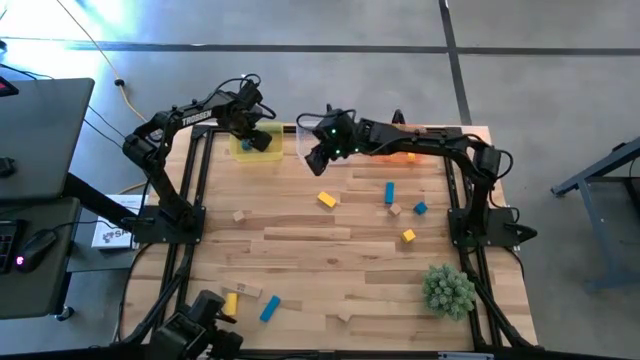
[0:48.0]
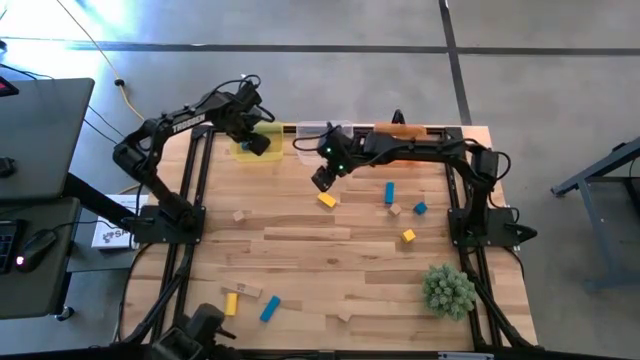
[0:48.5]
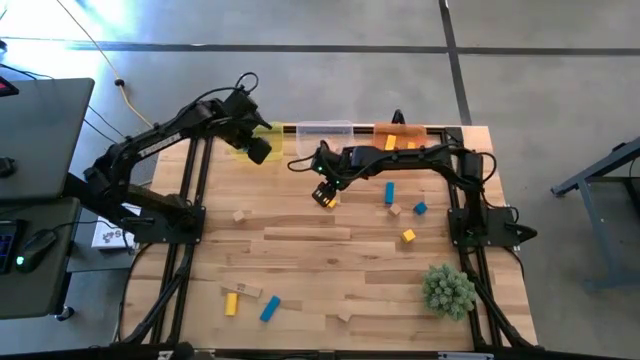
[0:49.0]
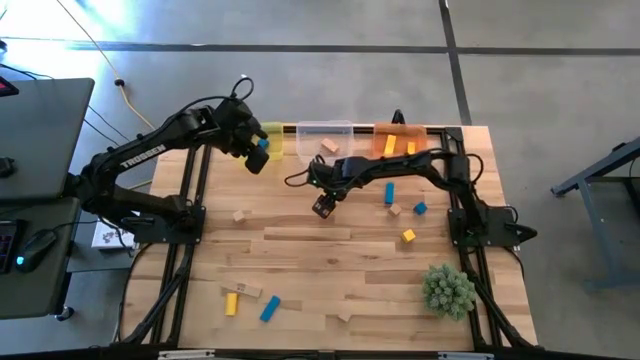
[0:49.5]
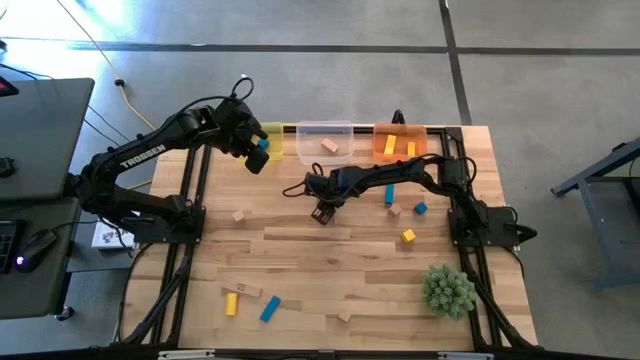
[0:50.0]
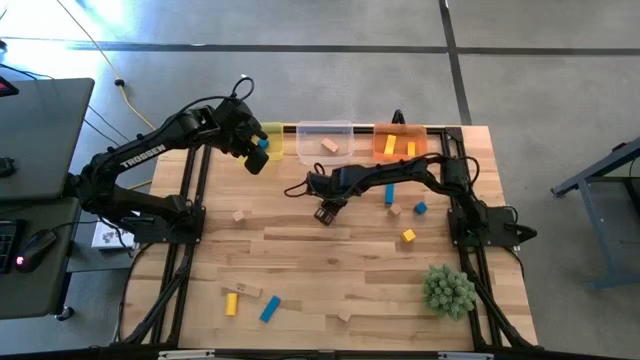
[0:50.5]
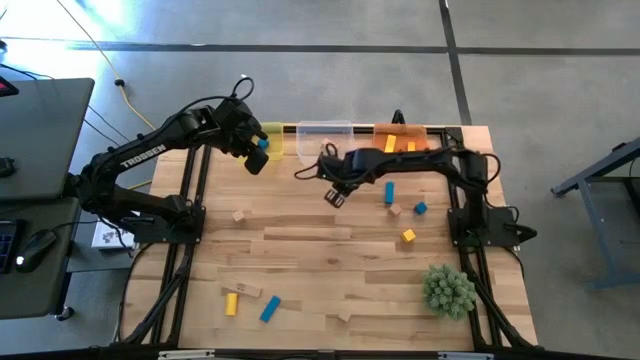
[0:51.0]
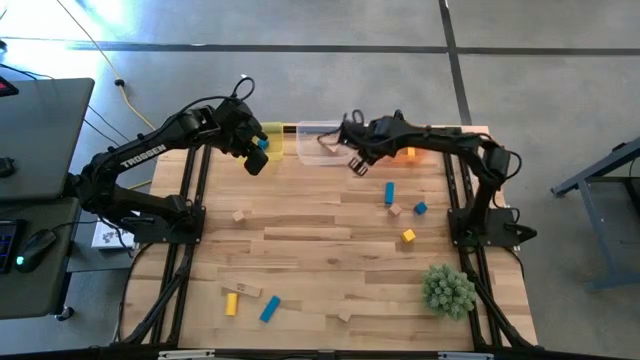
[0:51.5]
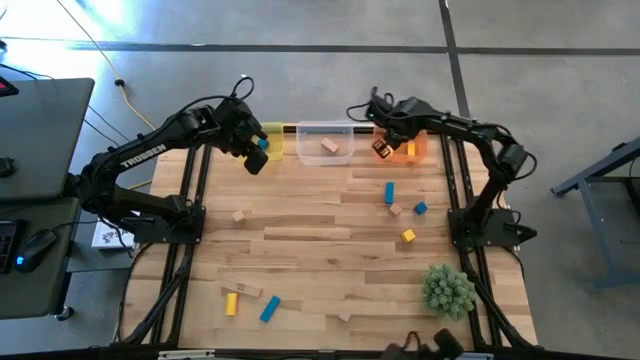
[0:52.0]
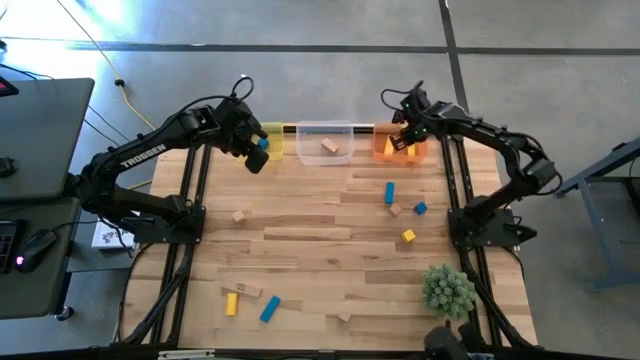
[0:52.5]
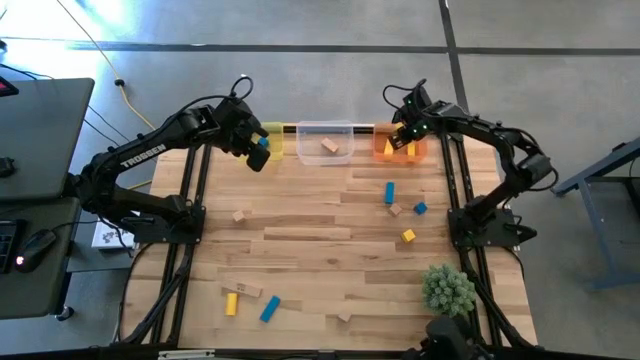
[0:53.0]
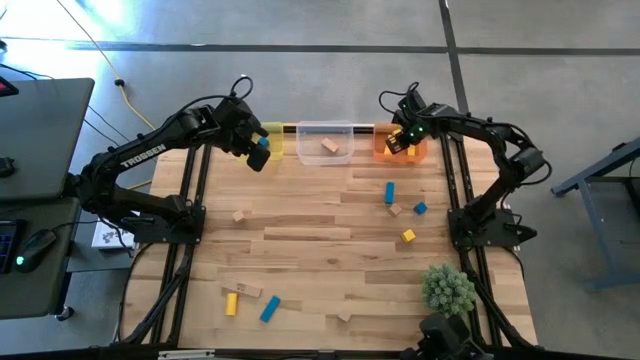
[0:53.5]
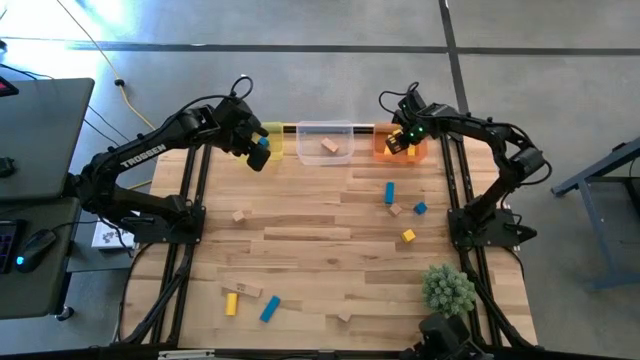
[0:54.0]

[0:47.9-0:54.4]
Task: Sort & place blocks by color
Put the yellow block into the orange bin

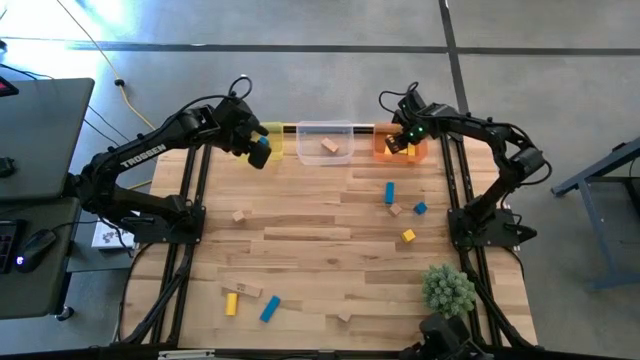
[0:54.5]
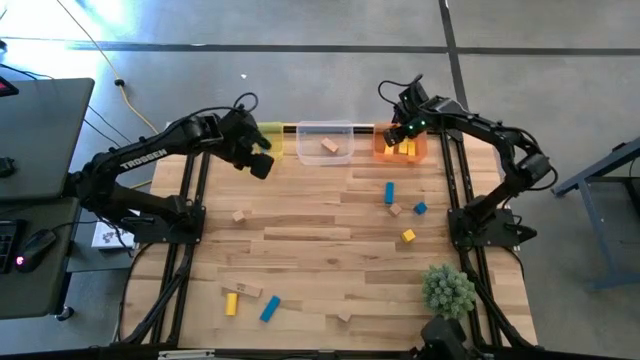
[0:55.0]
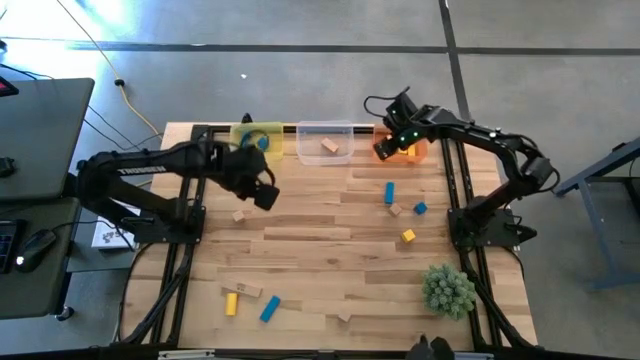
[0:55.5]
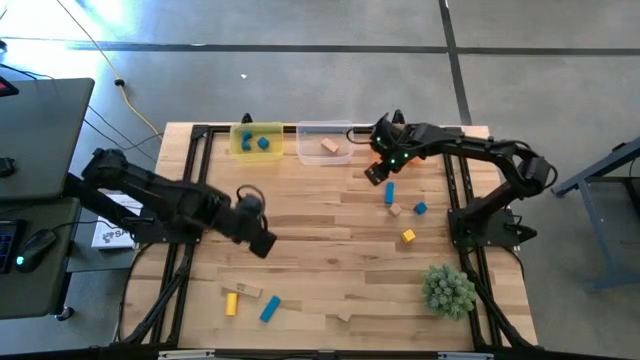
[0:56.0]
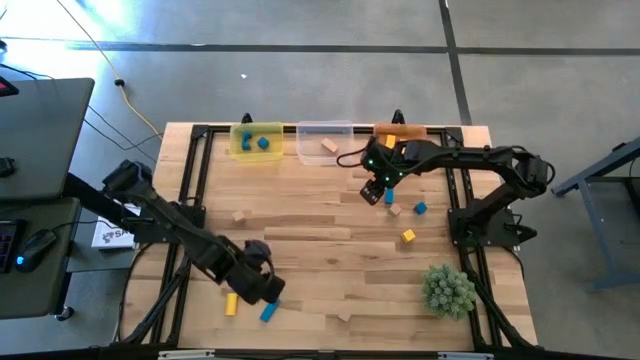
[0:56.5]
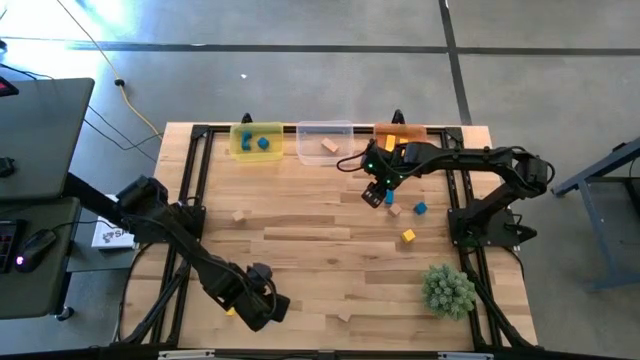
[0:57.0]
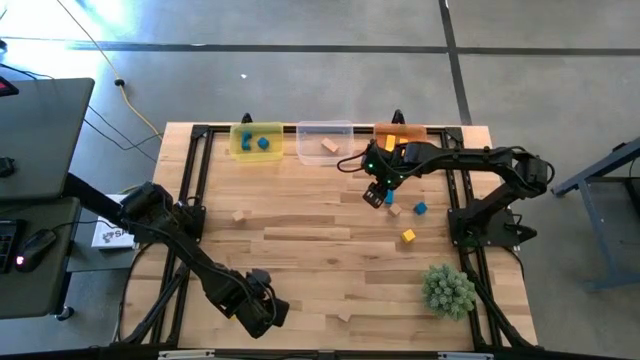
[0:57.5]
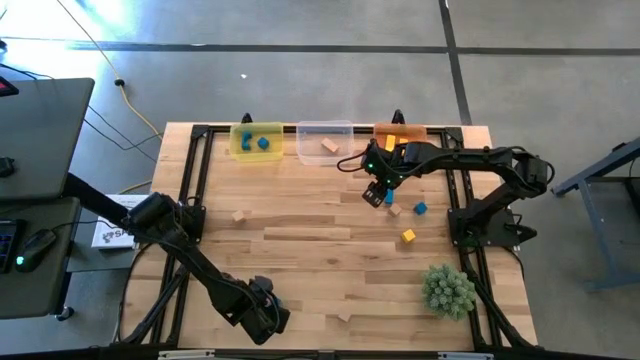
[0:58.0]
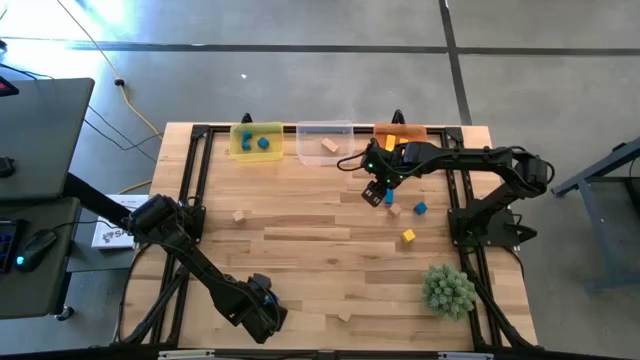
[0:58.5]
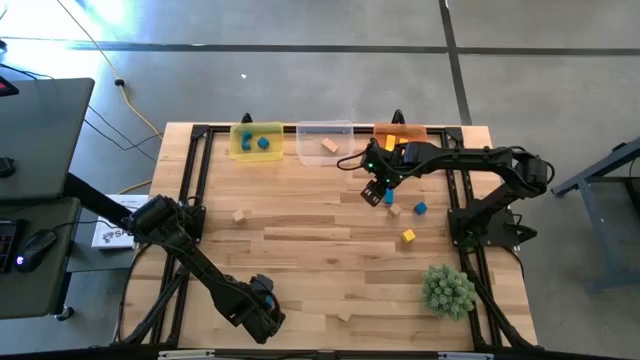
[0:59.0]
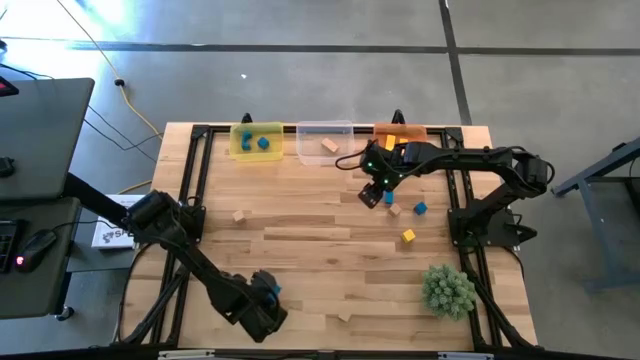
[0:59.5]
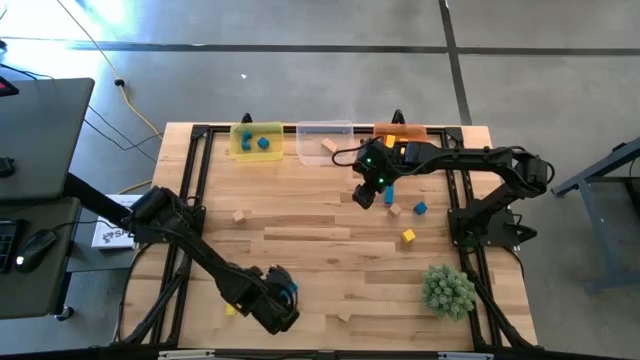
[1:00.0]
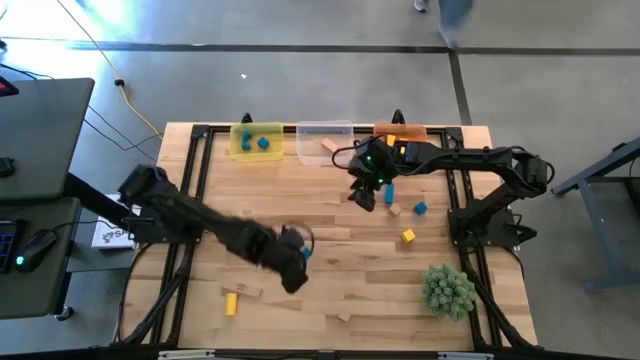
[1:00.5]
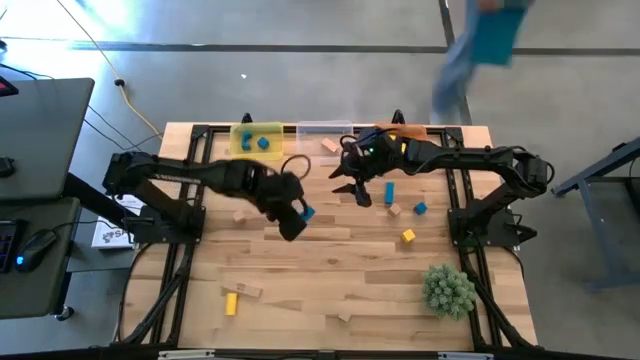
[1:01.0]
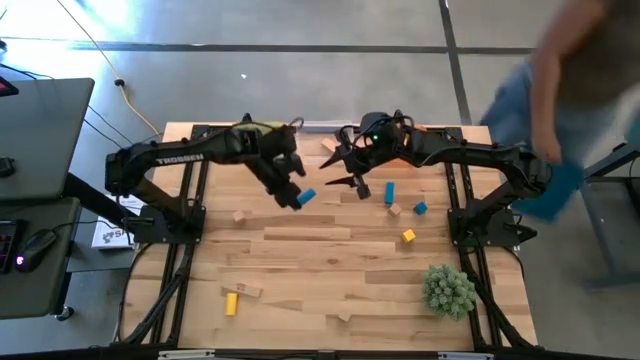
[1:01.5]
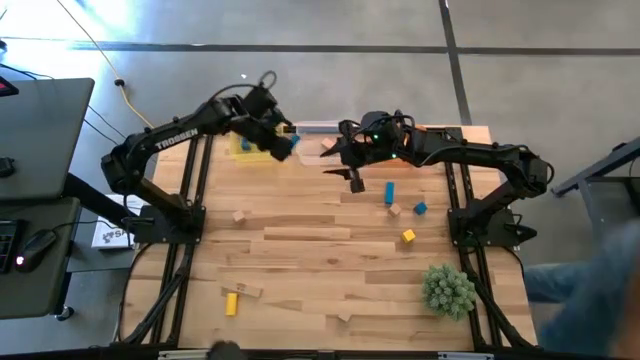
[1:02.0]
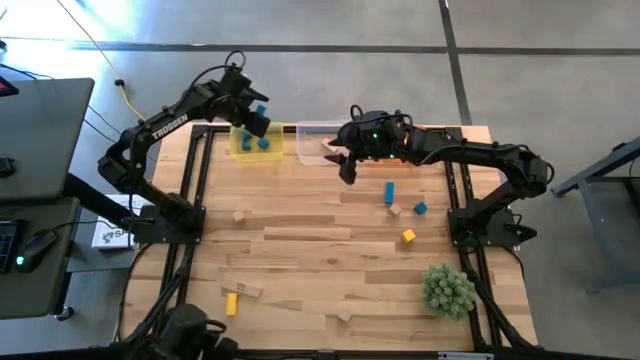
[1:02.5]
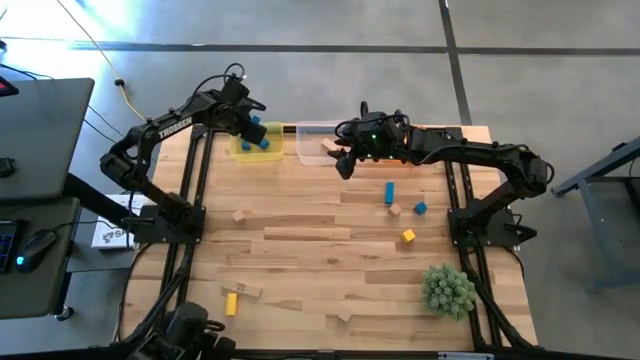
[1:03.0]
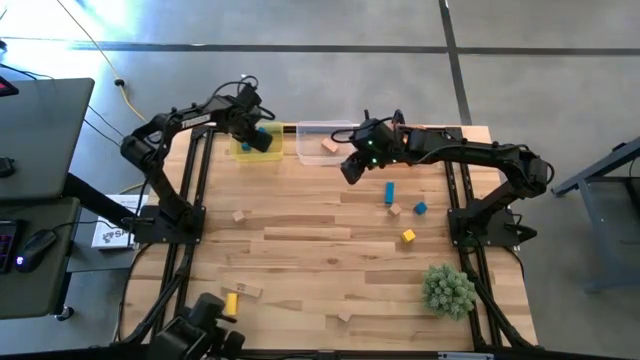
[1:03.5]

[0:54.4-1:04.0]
Put the blue block into the yellow bin

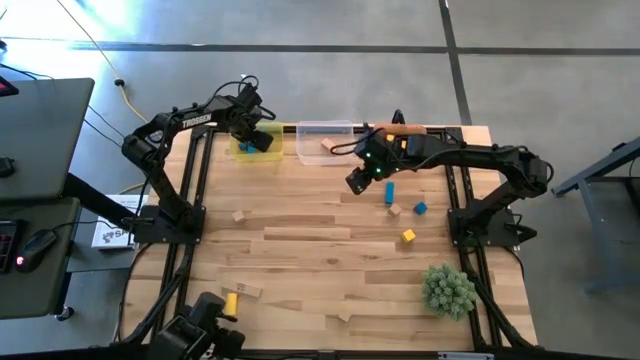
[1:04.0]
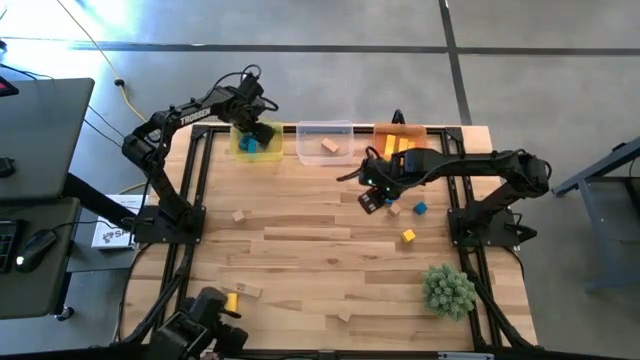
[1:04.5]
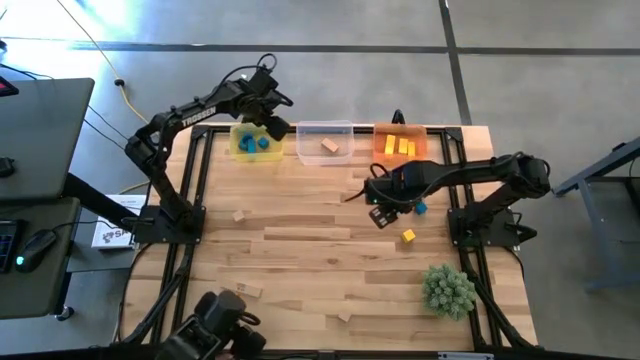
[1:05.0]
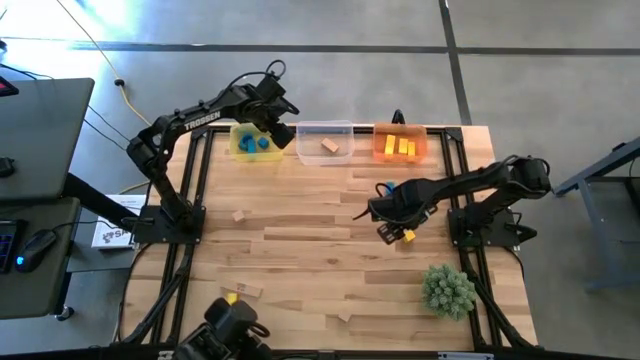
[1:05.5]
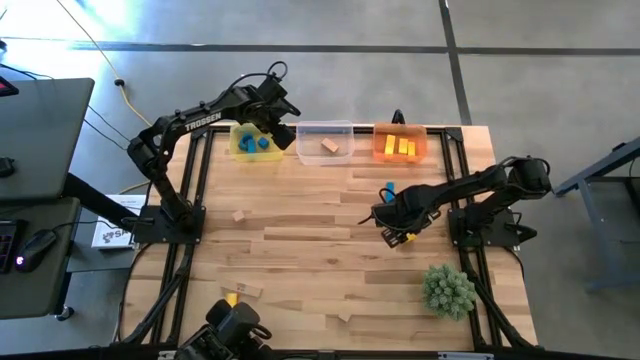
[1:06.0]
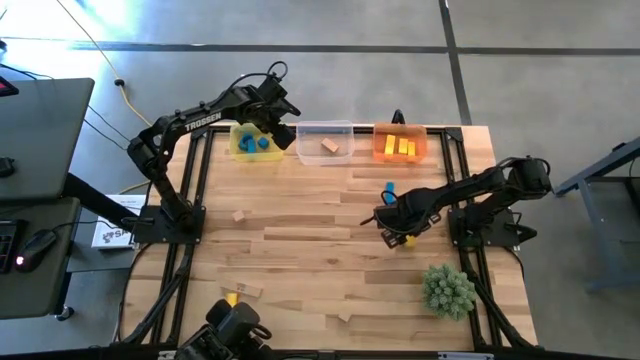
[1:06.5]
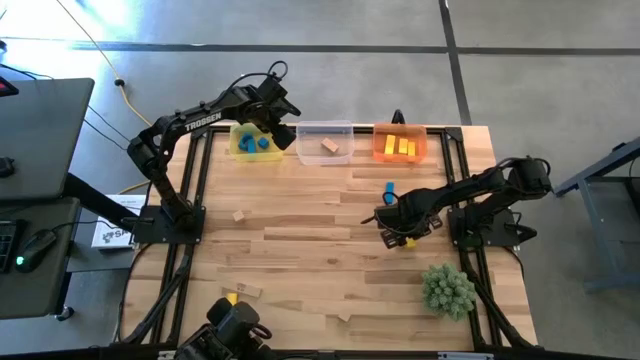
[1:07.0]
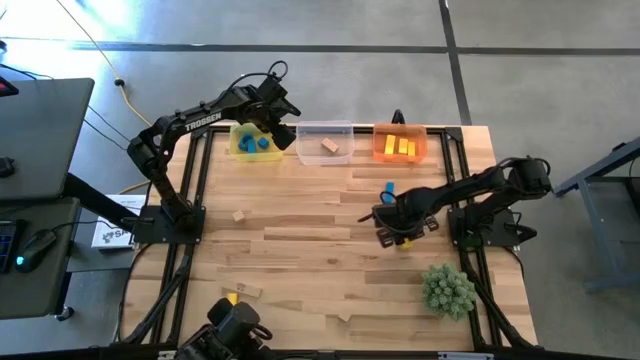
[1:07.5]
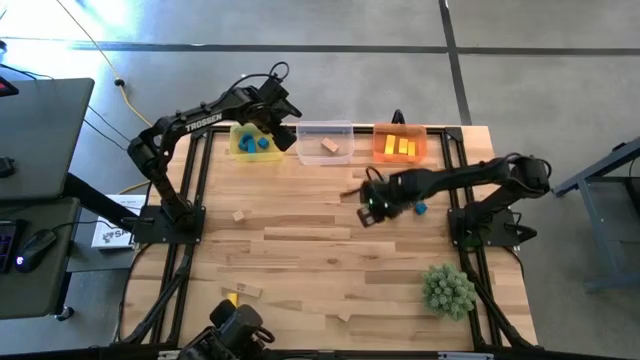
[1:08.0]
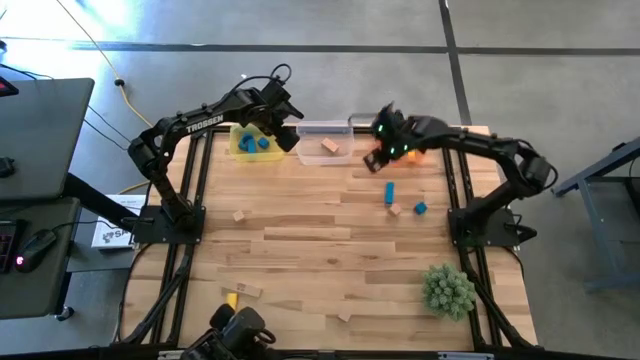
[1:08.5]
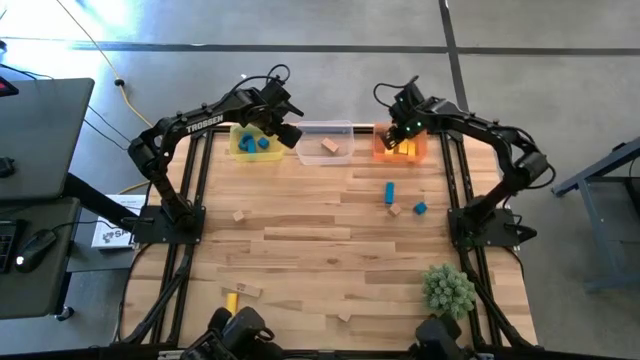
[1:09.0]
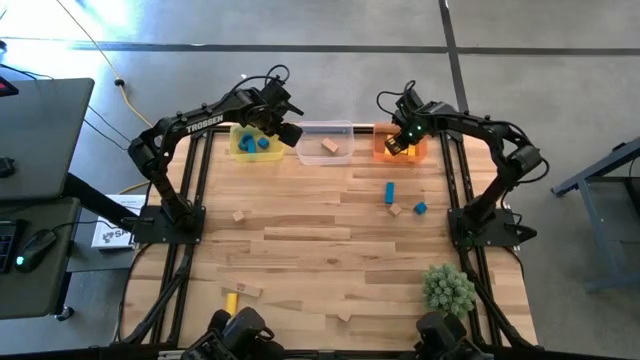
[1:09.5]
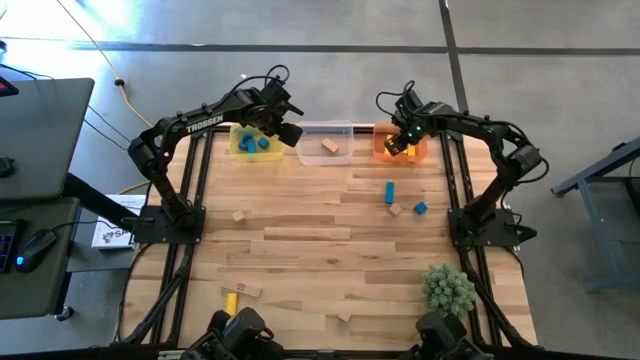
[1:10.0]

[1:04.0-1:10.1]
Put the yellow block into the orange bin
